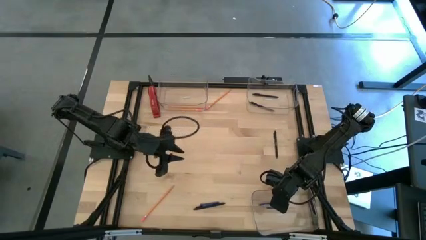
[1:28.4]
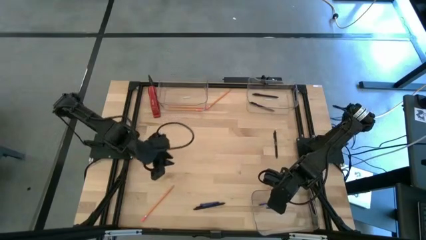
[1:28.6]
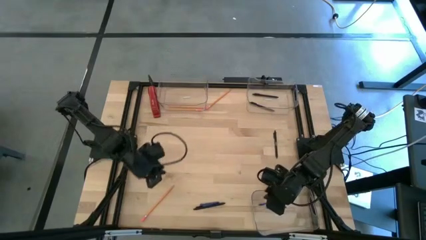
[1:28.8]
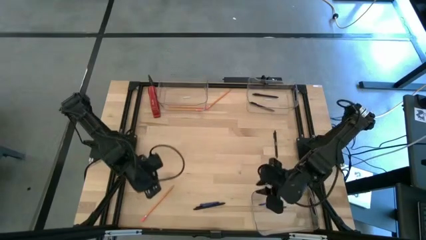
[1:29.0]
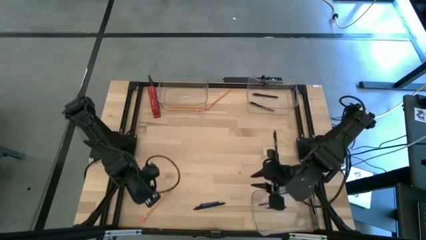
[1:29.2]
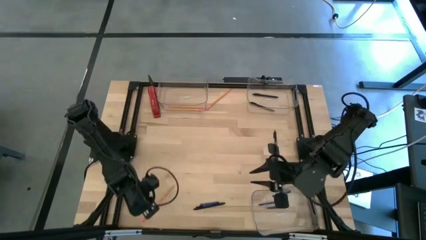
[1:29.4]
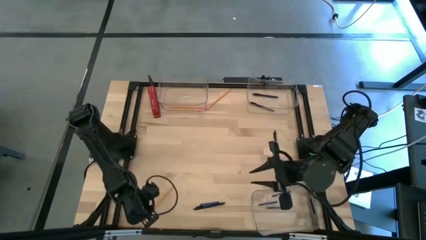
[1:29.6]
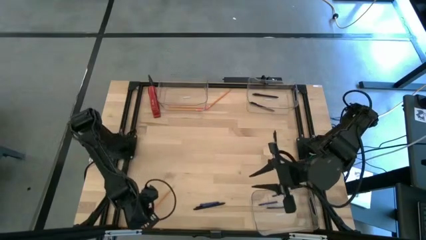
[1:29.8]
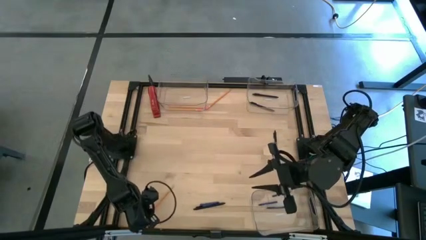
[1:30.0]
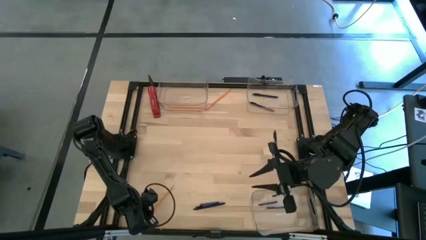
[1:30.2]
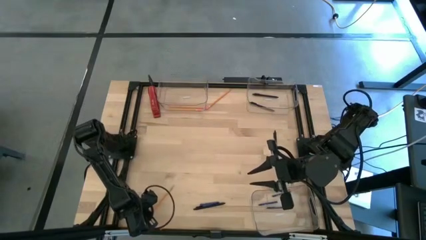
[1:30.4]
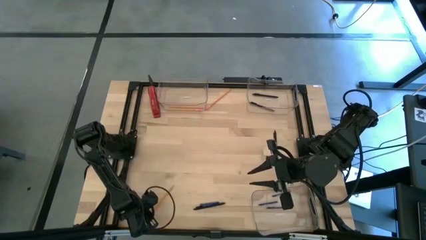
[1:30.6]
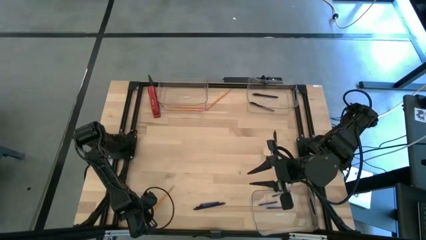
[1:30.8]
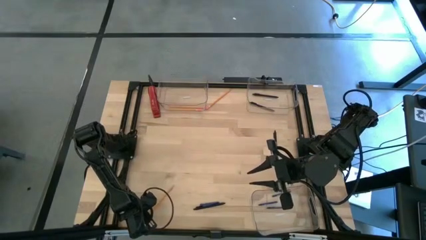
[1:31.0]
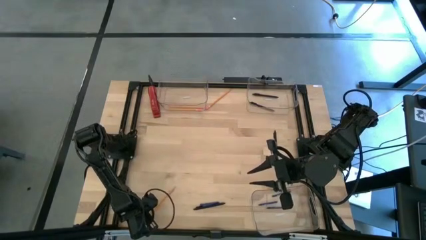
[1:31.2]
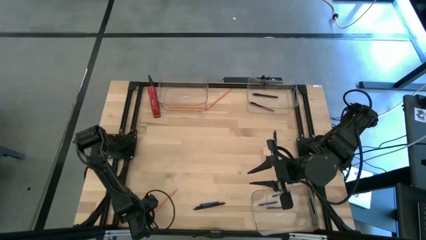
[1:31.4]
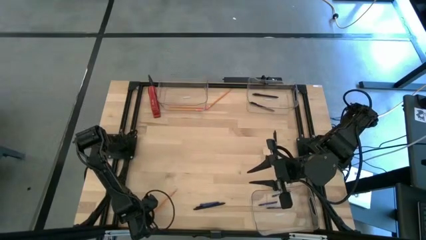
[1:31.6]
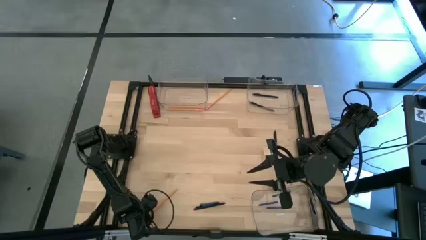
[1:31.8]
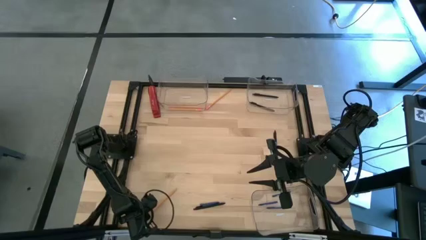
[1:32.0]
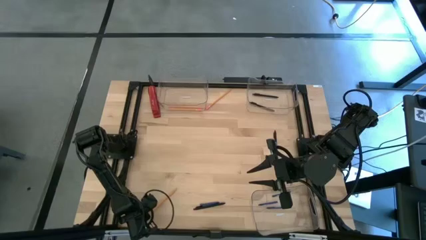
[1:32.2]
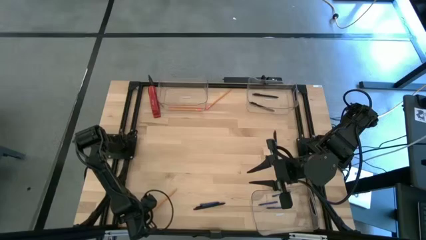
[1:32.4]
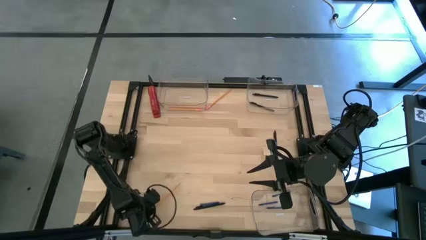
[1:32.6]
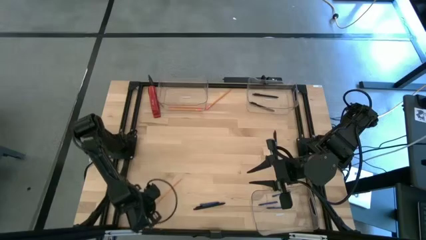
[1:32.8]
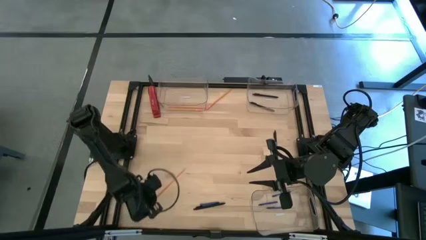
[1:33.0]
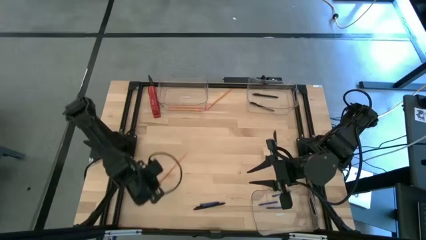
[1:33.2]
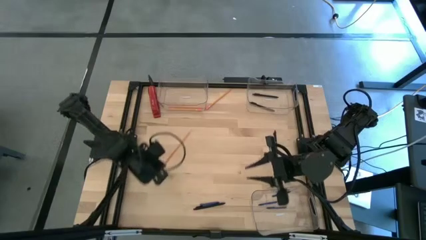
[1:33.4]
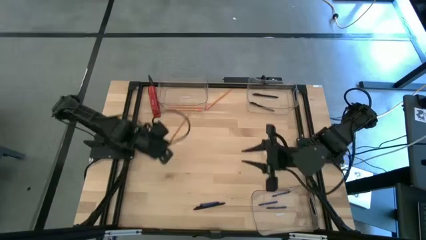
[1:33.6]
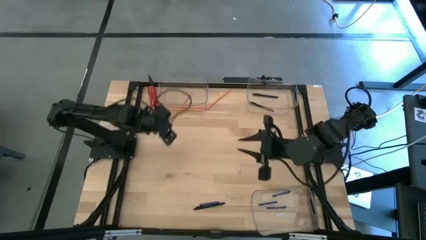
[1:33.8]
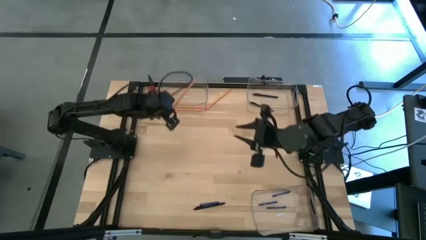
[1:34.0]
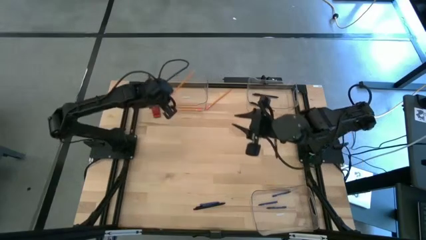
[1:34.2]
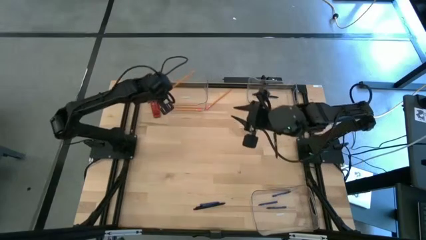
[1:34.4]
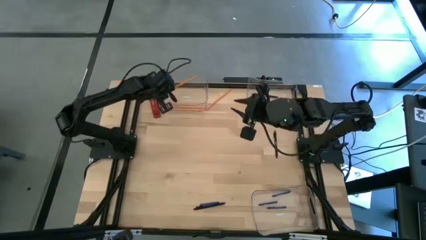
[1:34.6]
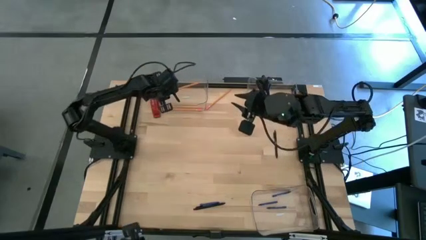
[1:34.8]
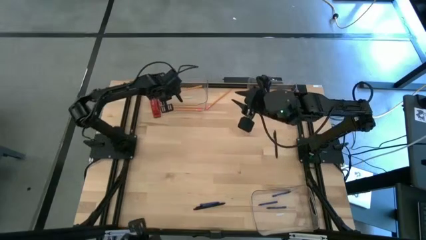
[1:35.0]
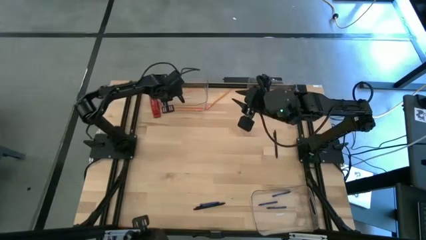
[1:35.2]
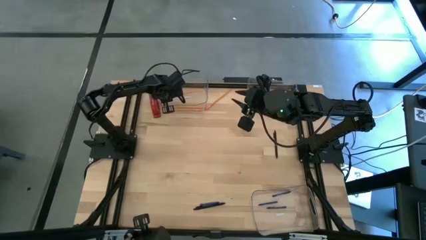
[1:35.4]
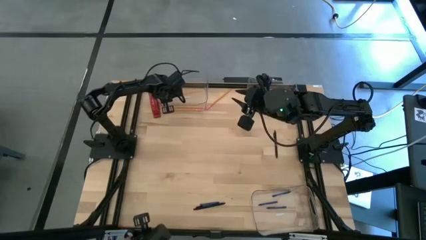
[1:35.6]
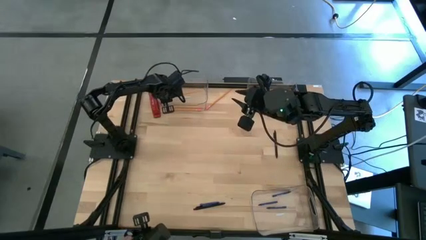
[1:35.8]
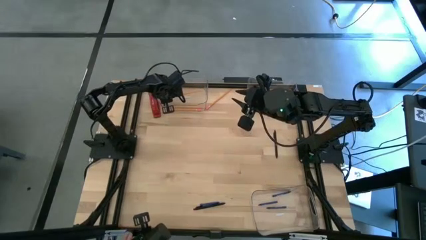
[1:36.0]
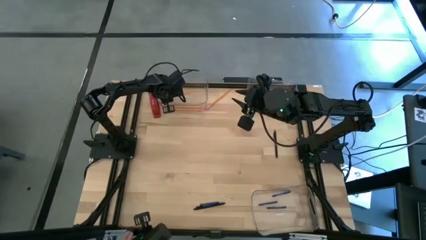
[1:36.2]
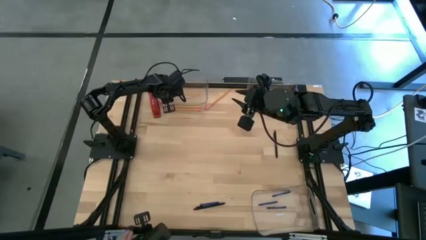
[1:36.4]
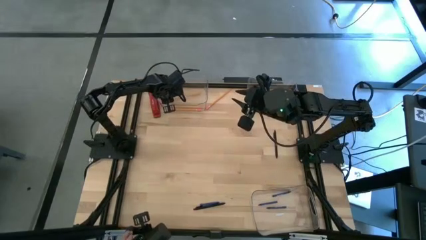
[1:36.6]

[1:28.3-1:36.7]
Task: Sort crayons/erasers/pens/pencils in bins
Put the yellow pencil into the top left transparent bin

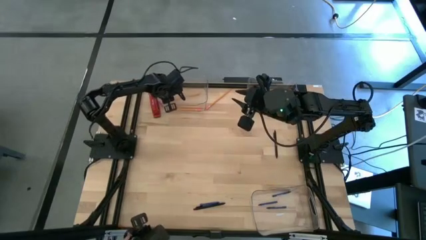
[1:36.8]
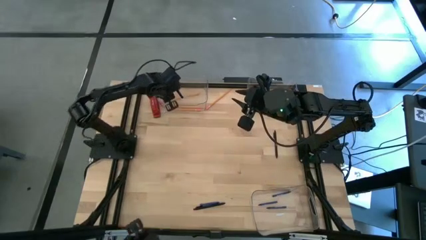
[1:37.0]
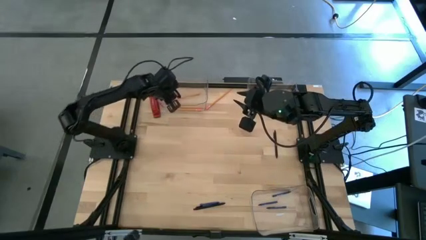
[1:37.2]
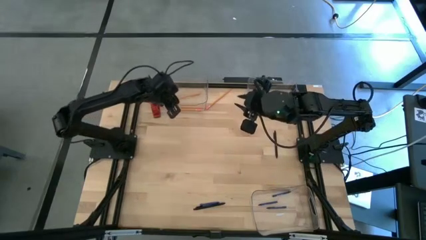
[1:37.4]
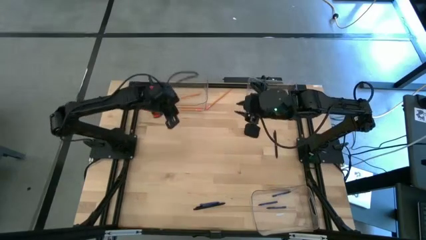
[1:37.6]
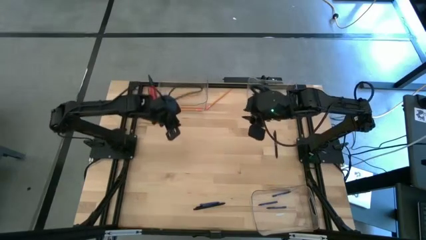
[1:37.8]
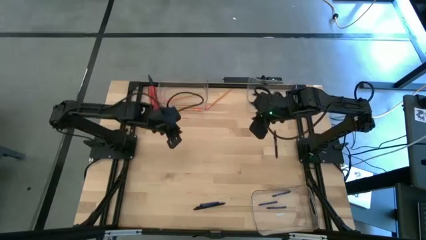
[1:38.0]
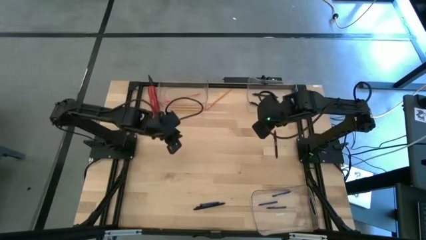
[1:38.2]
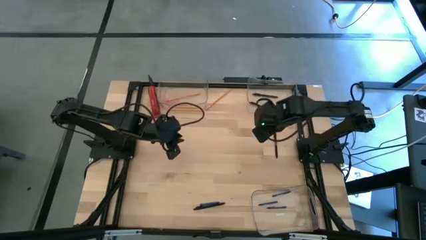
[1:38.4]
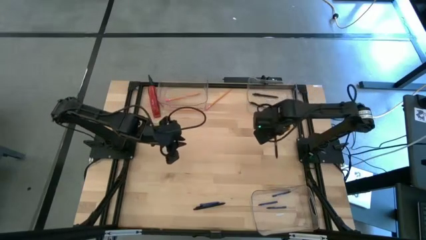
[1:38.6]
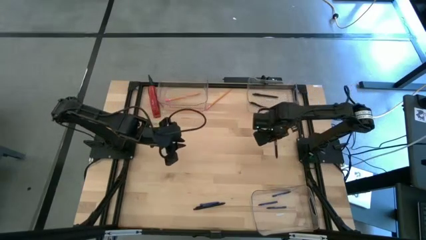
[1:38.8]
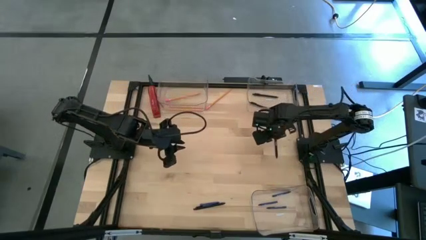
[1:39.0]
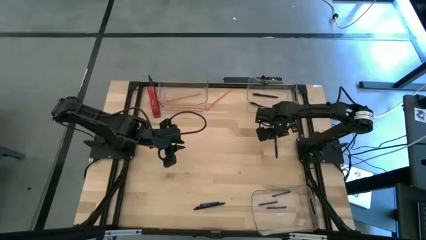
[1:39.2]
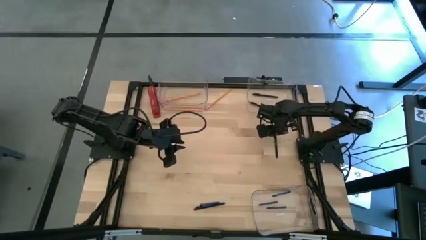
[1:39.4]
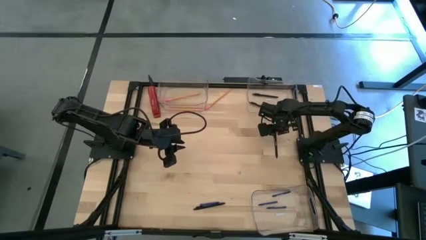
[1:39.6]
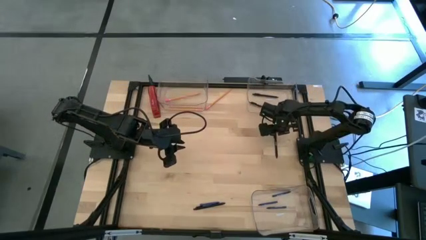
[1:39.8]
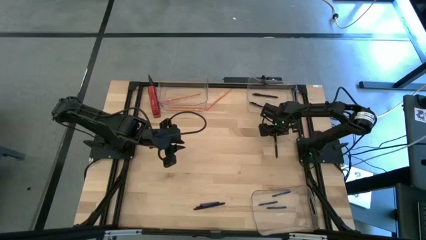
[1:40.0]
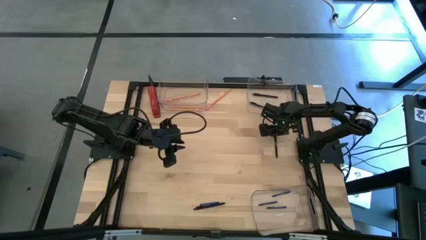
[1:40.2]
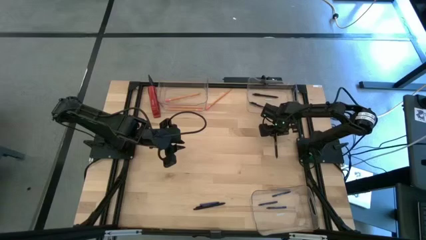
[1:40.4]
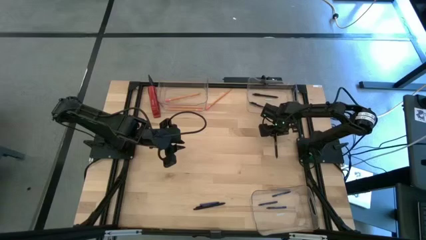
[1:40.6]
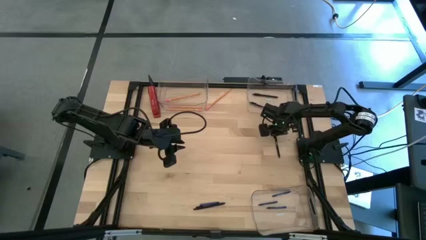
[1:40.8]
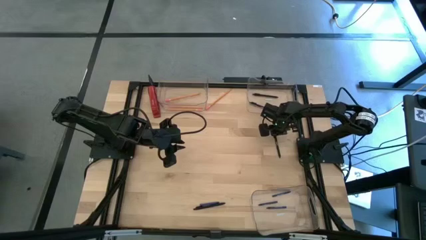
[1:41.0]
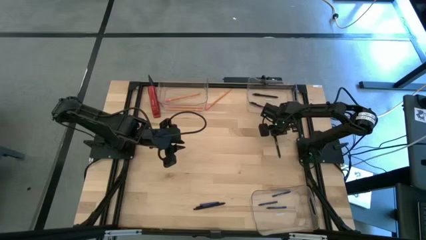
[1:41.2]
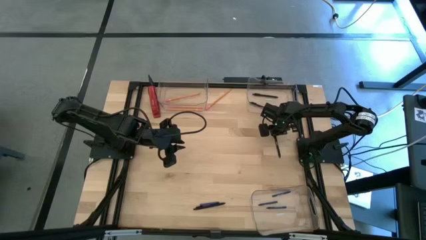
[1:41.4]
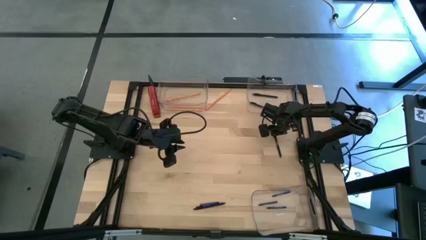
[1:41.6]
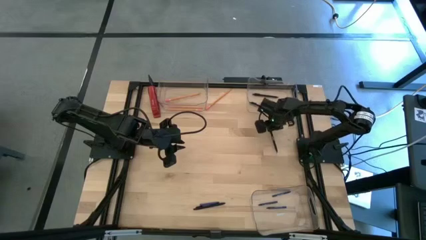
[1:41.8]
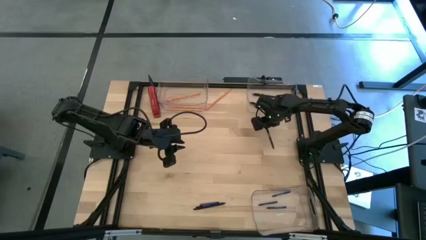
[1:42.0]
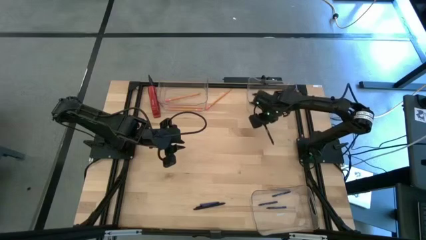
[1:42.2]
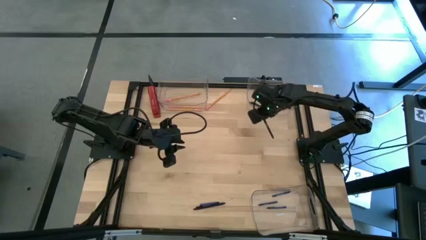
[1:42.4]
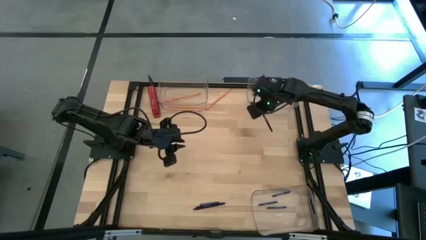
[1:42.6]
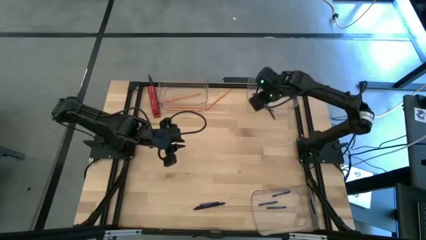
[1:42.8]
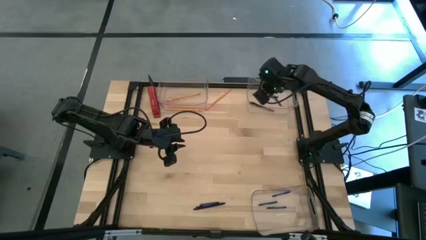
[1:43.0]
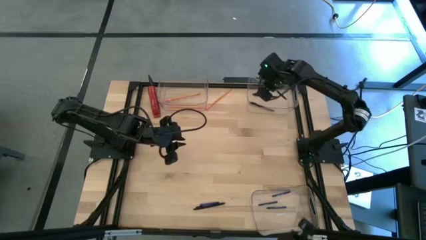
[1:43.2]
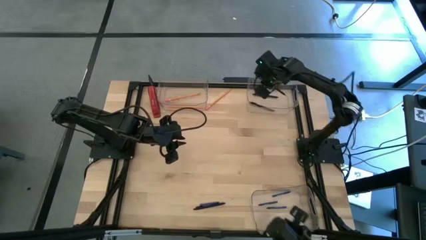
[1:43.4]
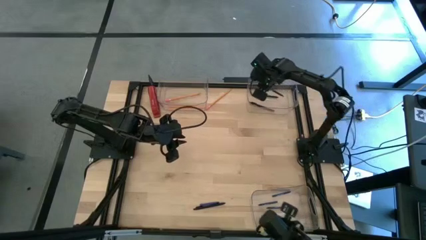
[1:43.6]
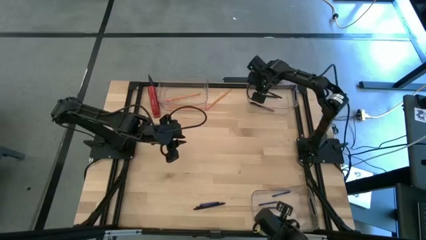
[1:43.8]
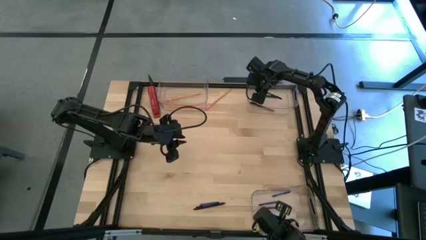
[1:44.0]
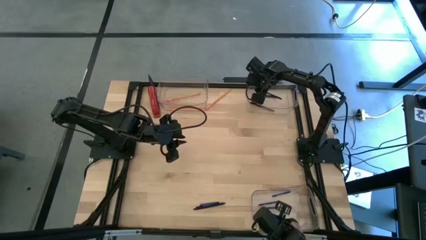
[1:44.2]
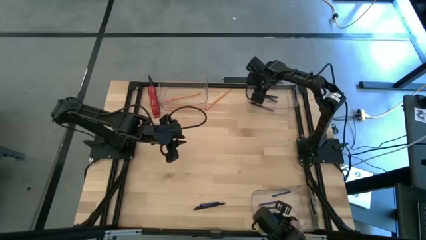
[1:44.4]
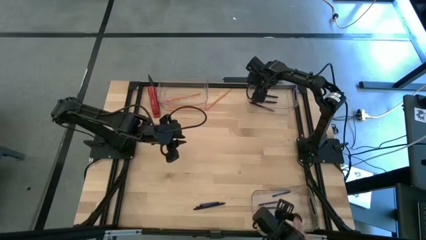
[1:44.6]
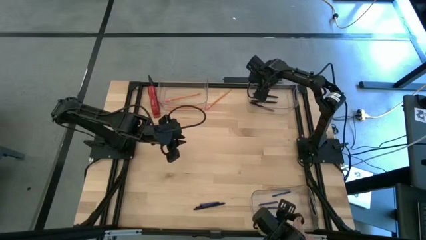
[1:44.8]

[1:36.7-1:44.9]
Put the black pen into the top right transparent bin
